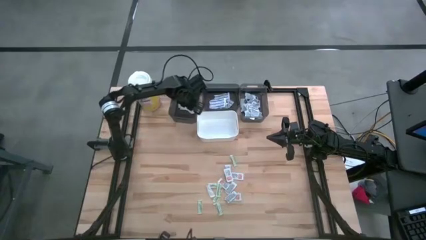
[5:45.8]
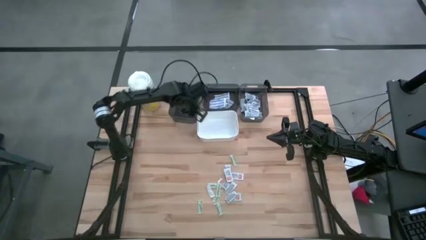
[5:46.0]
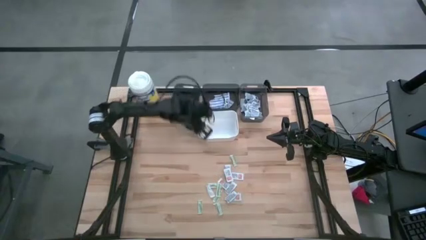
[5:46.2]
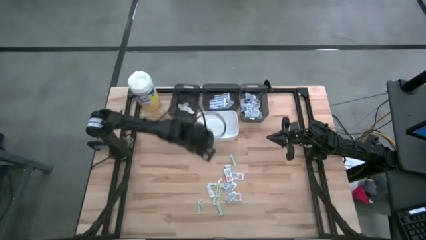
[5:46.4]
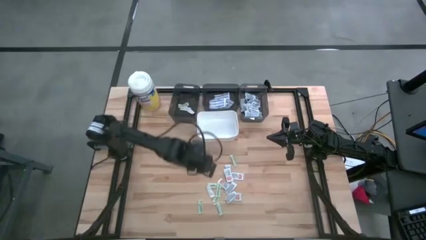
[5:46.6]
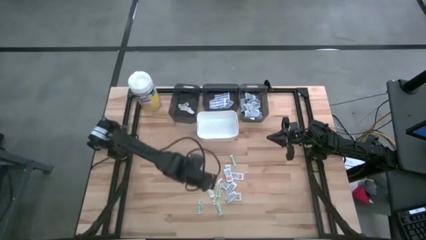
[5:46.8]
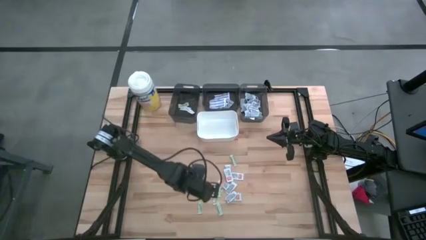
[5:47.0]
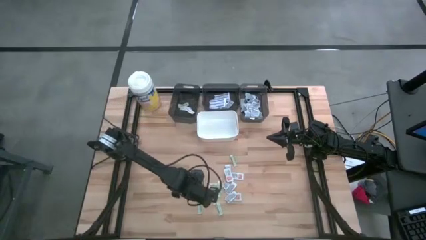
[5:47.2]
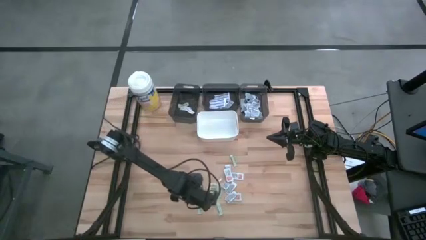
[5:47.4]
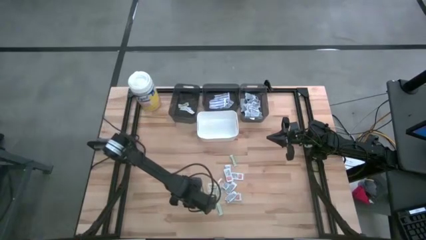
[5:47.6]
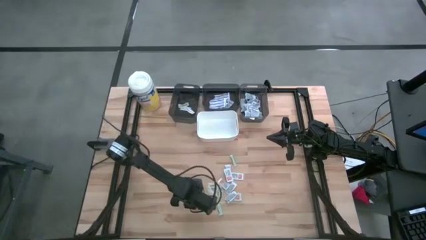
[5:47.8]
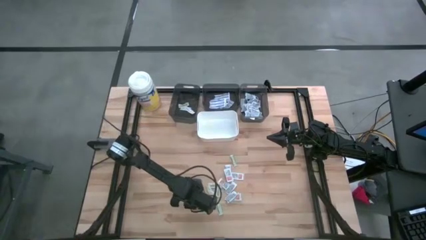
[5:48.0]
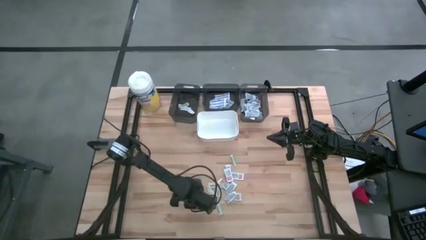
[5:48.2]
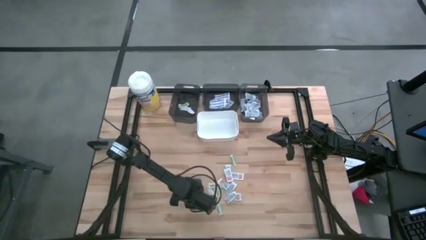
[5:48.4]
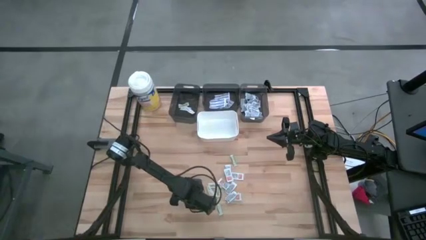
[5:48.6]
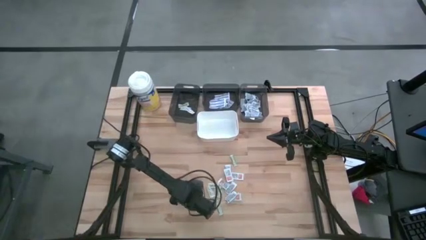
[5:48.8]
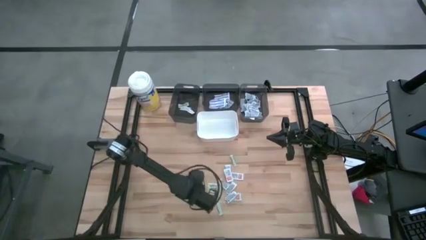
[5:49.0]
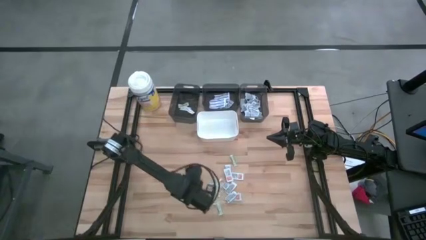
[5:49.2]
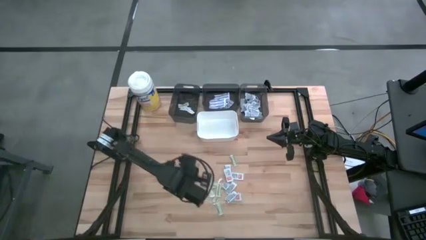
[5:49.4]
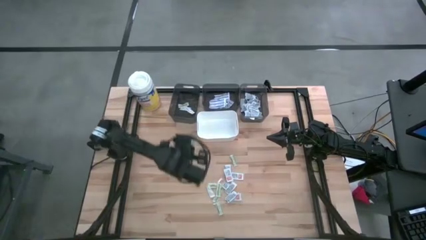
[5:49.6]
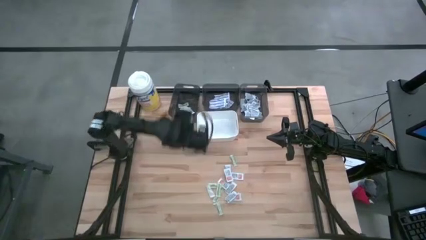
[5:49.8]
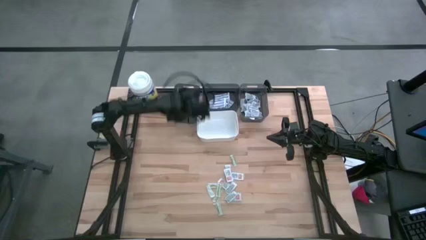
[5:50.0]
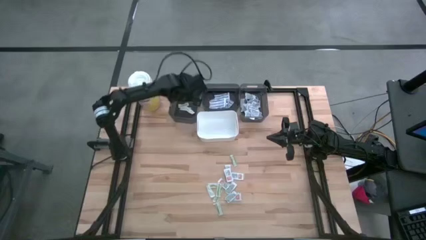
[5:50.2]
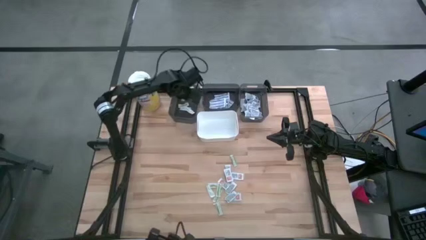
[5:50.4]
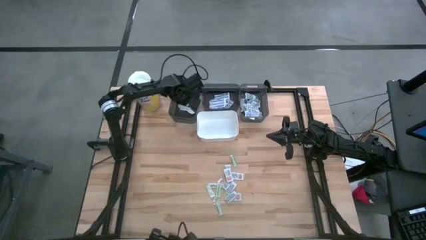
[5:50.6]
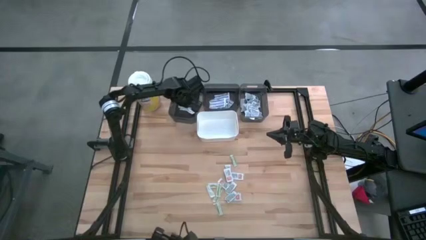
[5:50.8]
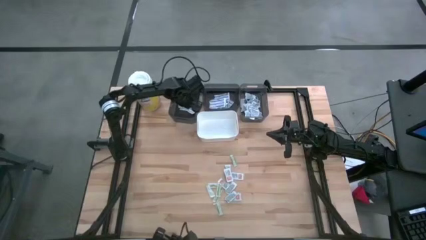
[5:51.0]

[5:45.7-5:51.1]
Task: Pick & Place First Aid Supplies
Put the green bandage pack into the left black bin

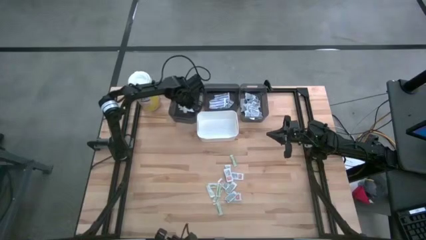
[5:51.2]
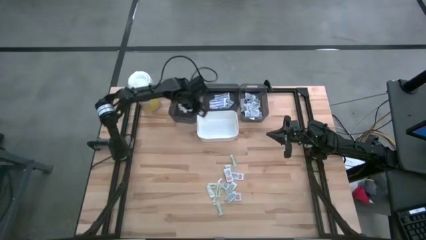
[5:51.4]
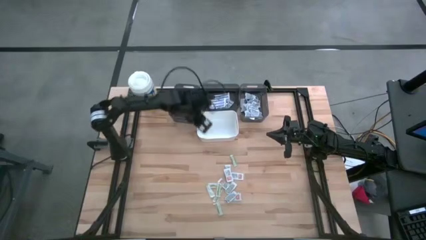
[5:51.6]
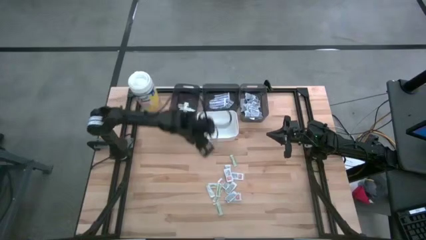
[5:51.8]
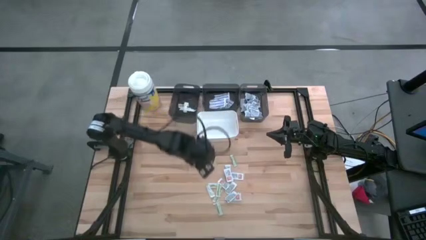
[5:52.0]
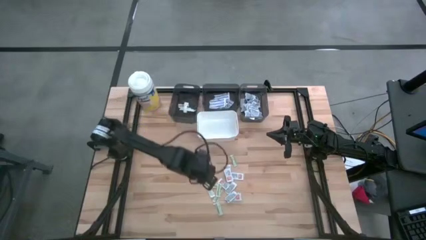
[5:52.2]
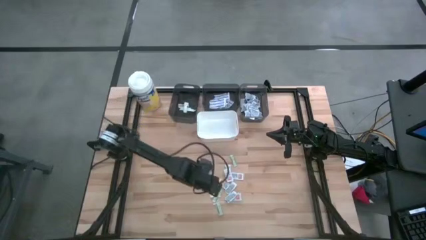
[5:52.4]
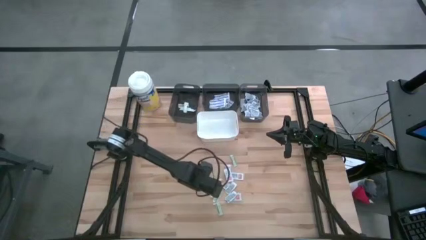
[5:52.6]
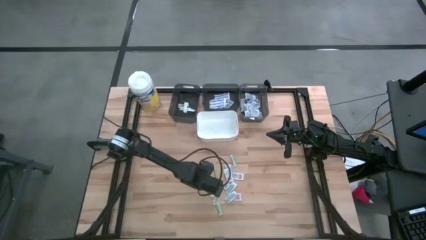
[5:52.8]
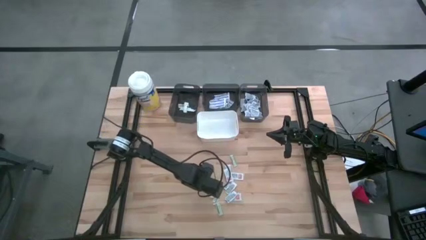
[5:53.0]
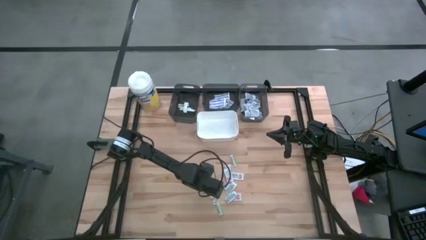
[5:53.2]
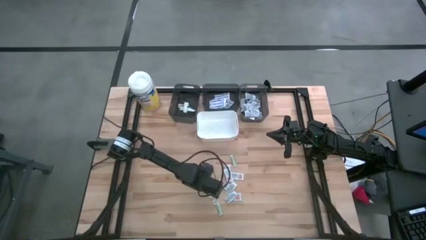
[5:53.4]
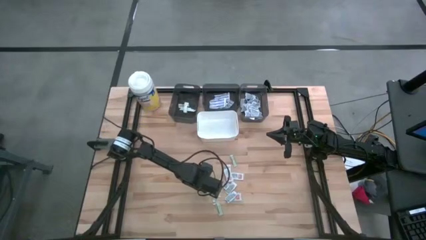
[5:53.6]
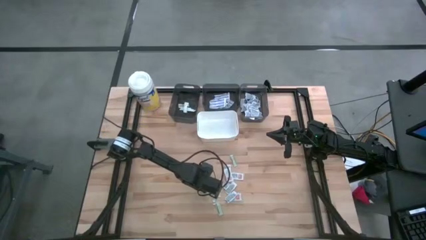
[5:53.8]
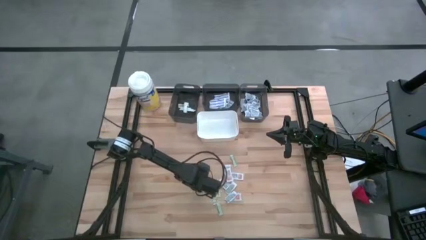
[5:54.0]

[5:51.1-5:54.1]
Put the green bandage pack into the left black bin

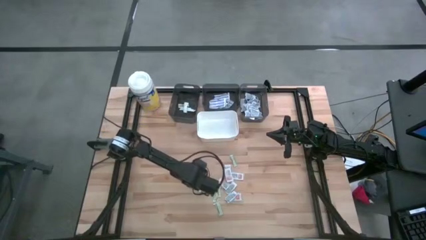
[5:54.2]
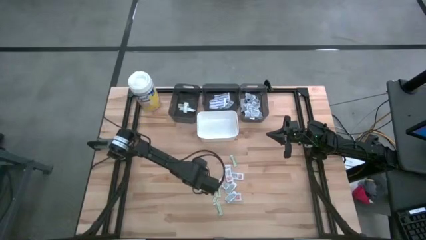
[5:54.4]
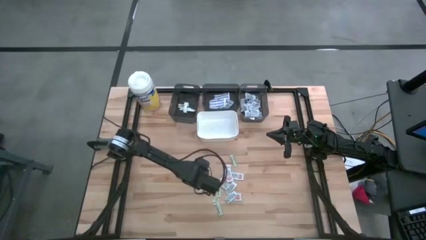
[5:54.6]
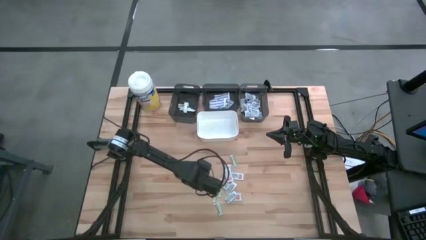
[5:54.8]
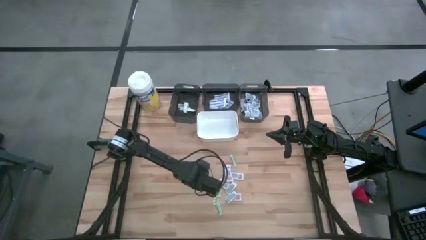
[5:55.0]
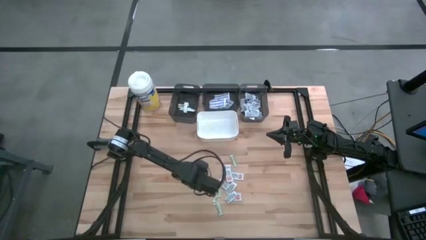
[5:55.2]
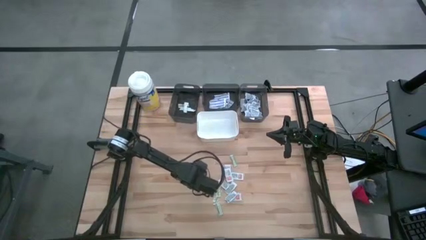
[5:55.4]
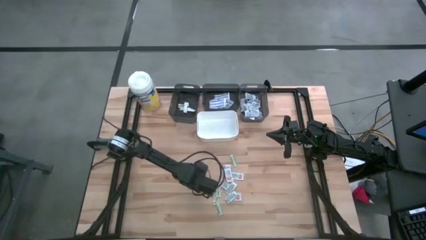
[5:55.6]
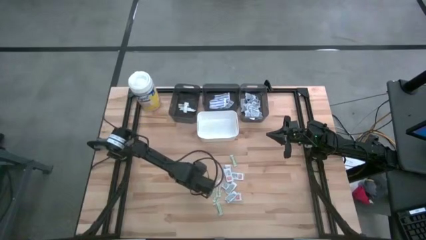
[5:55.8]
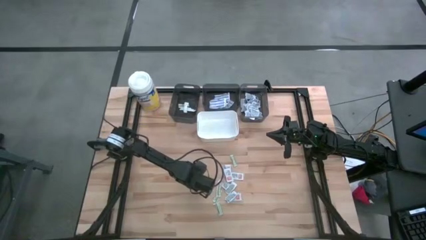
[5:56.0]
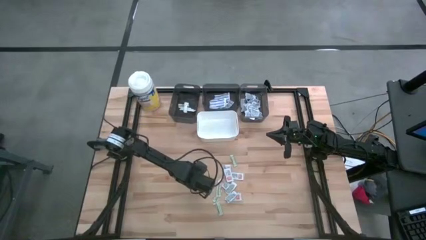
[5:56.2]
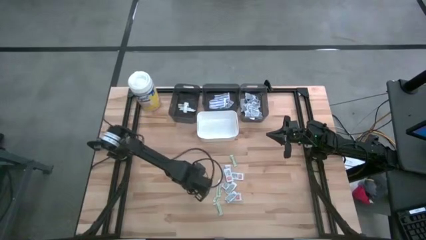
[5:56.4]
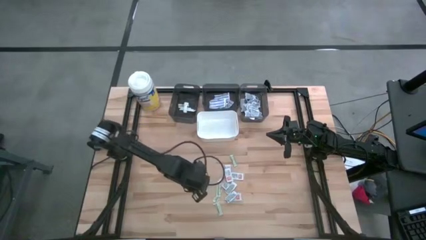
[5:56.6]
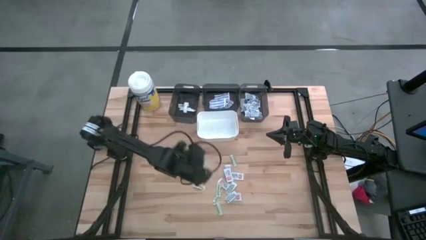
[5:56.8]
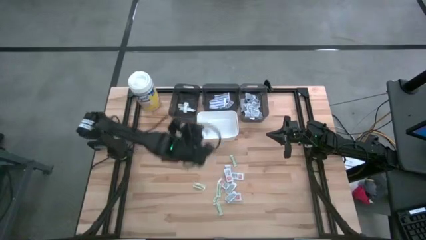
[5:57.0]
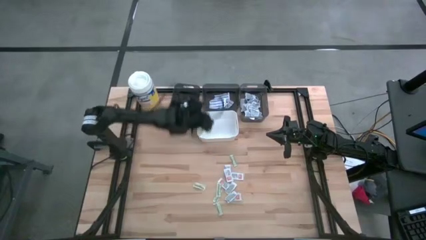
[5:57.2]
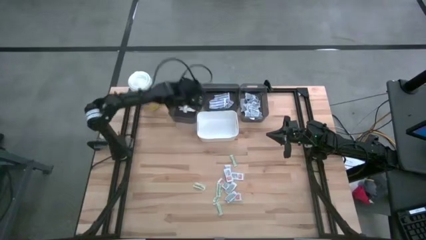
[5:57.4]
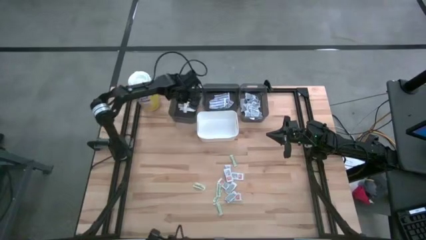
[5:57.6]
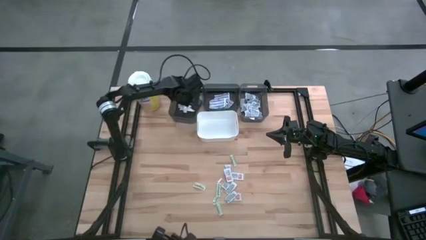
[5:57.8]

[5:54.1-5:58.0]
Put the green bandage pack into the left black bin

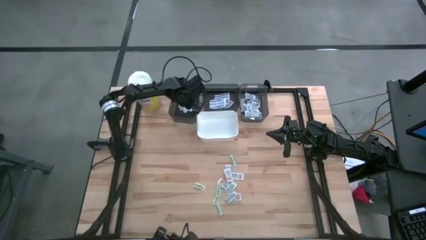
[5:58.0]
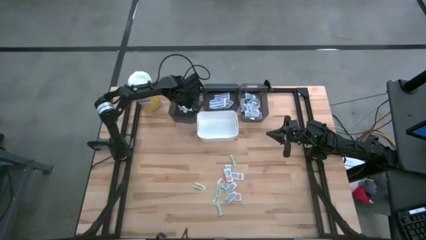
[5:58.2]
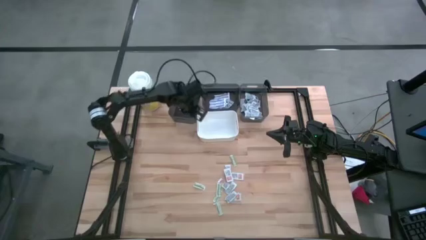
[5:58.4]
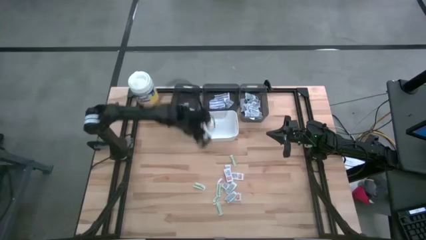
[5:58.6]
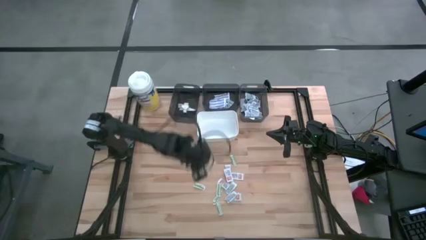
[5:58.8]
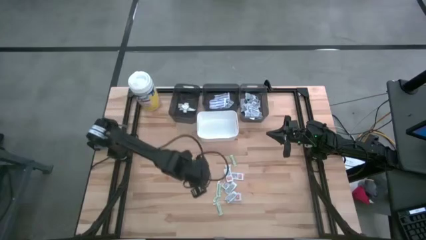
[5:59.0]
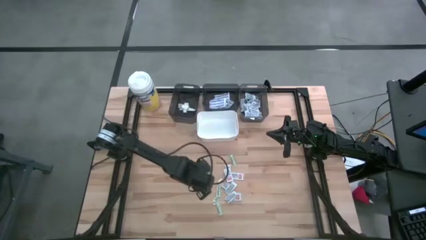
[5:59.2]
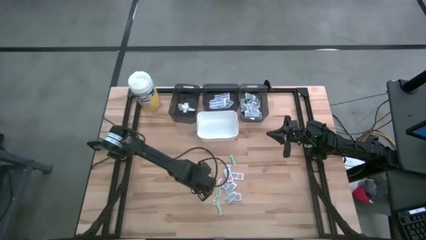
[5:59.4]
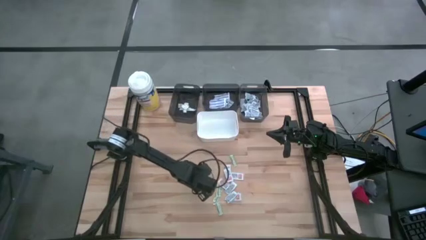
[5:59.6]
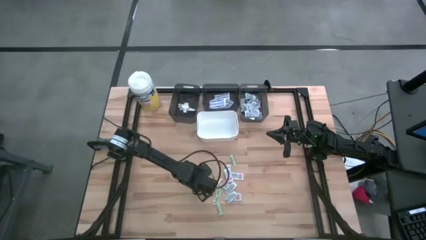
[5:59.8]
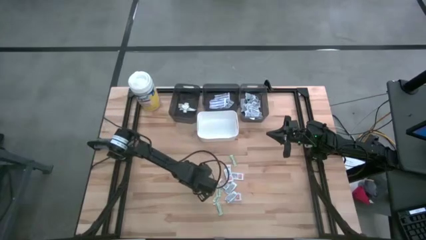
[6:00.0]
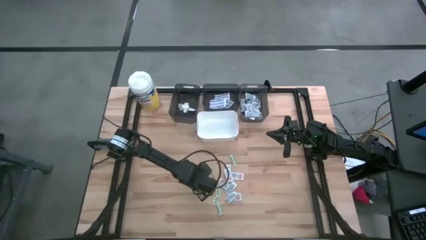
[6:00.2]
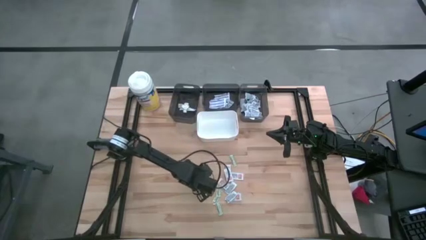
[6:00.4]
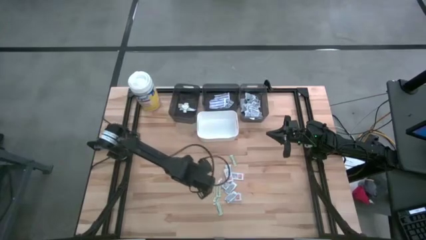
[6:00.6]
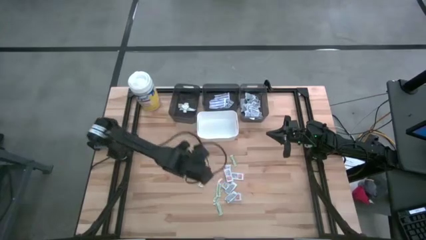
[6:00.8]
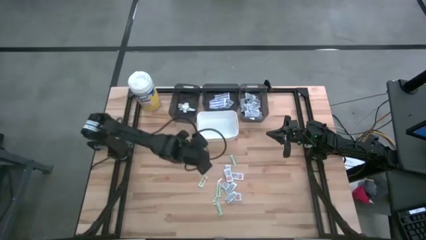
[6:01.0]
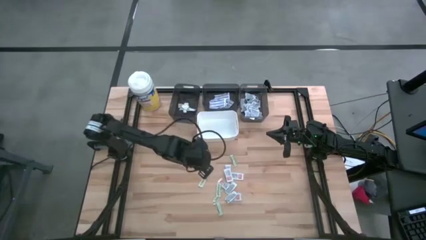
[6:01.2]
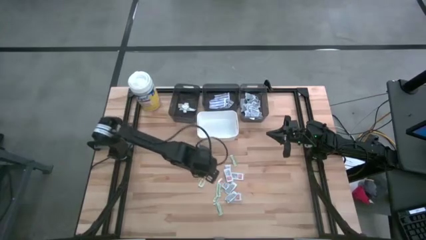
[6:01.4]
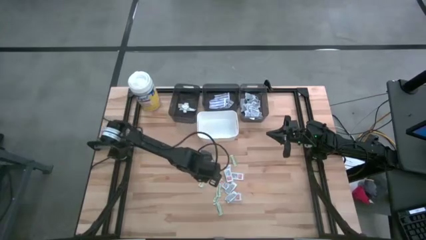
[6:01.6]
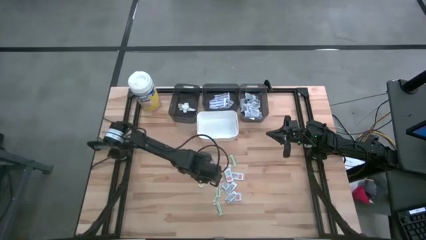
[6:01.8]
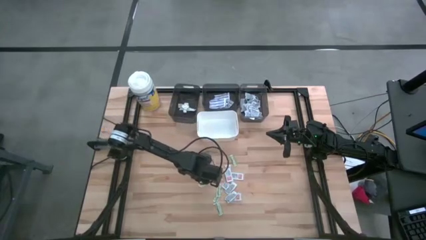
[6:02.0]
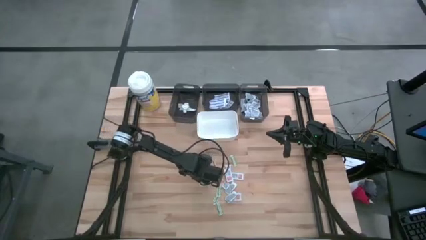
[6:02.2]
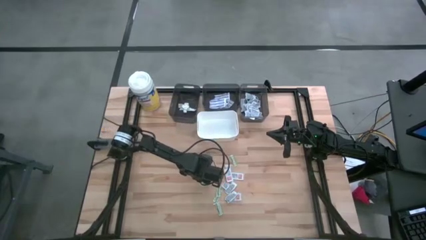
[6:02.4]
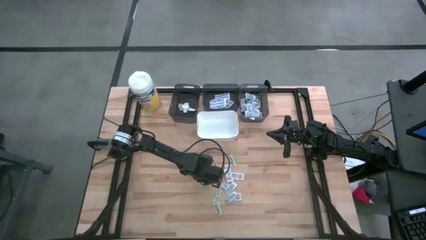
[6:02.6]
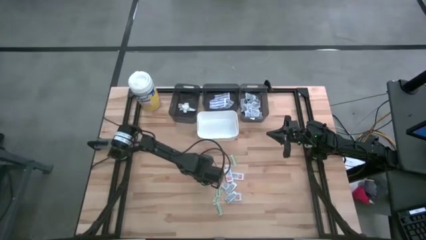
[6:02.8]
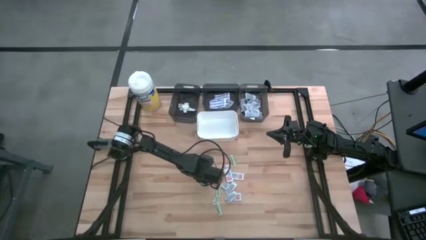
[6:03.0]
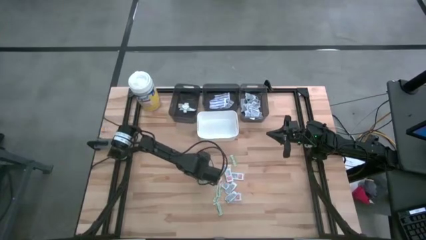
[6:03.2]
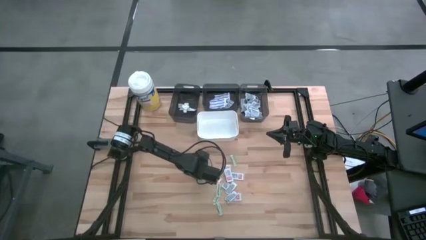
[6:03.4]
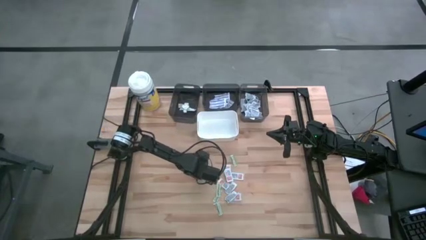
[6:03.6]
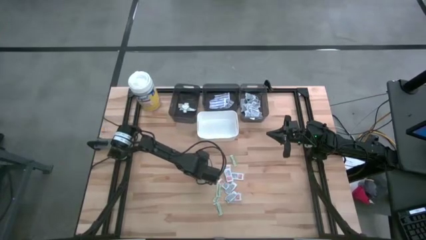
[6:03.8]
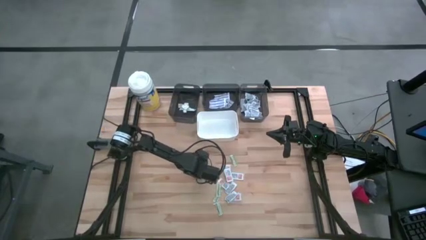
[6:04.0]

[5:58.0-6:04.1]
Put the green bandage pack into the left black bin
